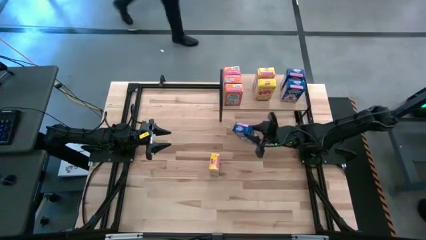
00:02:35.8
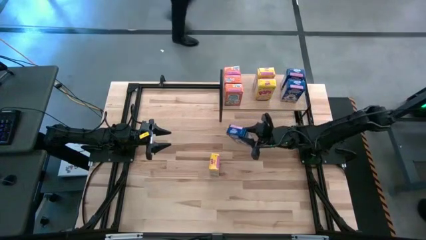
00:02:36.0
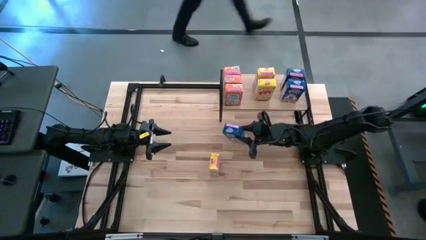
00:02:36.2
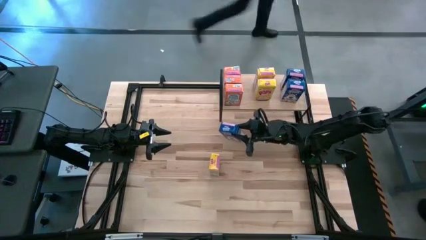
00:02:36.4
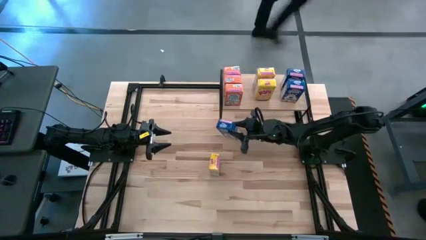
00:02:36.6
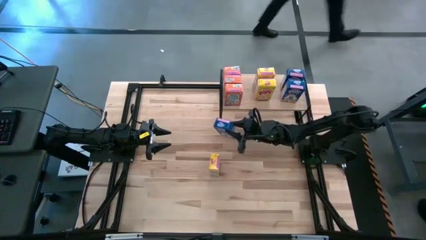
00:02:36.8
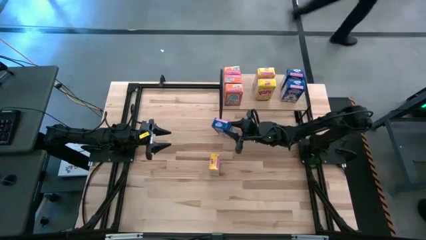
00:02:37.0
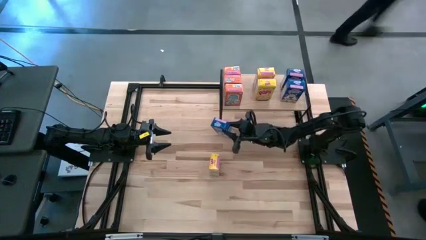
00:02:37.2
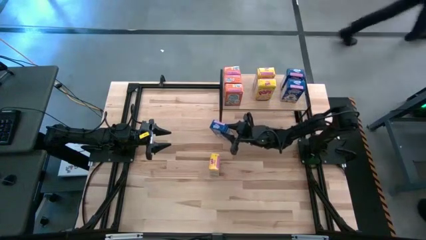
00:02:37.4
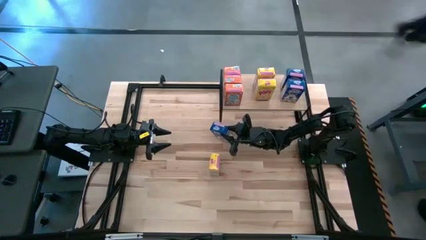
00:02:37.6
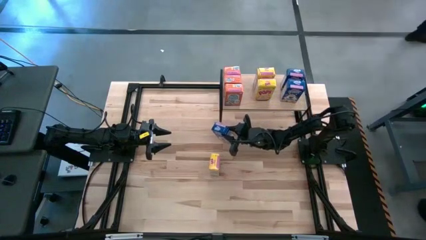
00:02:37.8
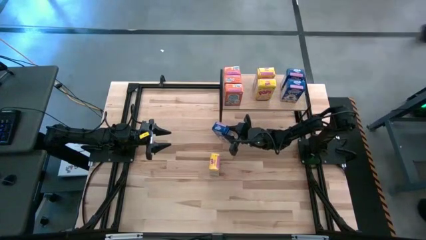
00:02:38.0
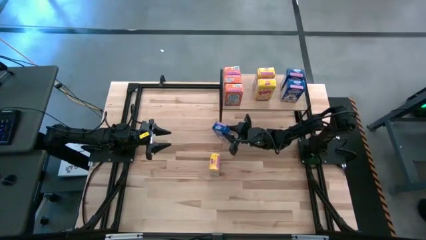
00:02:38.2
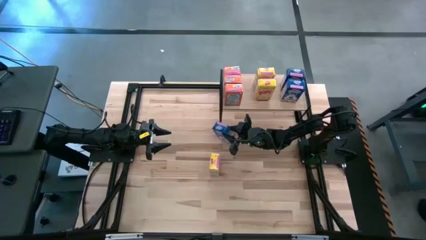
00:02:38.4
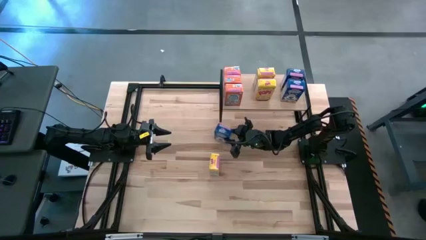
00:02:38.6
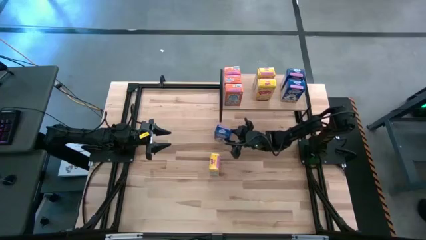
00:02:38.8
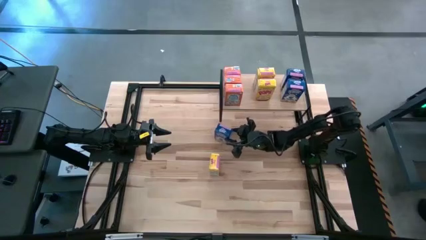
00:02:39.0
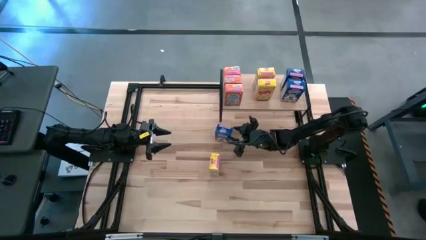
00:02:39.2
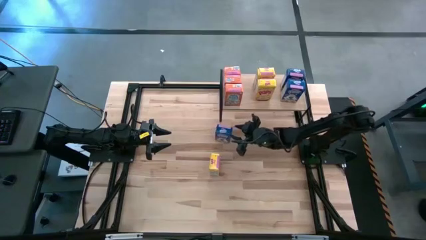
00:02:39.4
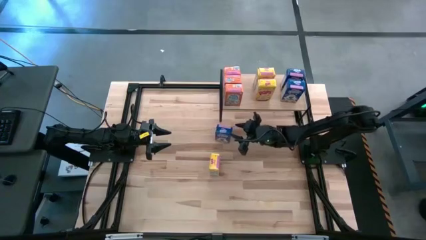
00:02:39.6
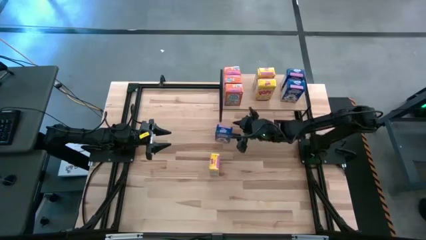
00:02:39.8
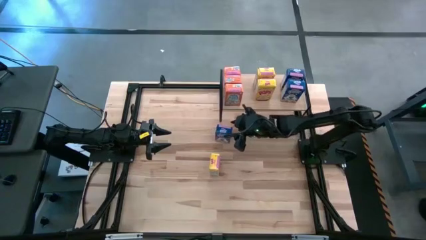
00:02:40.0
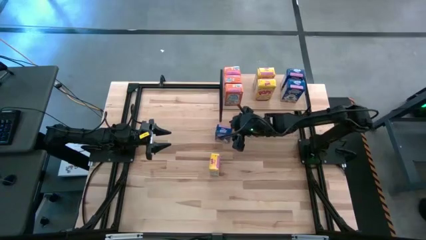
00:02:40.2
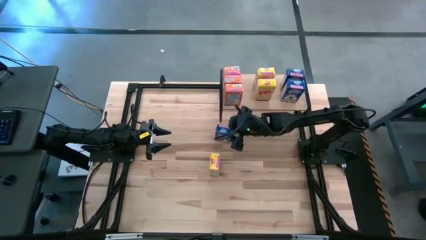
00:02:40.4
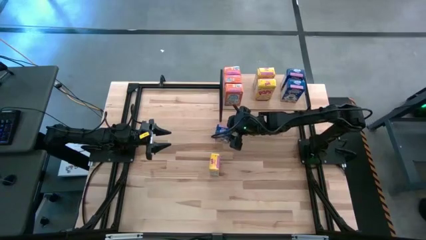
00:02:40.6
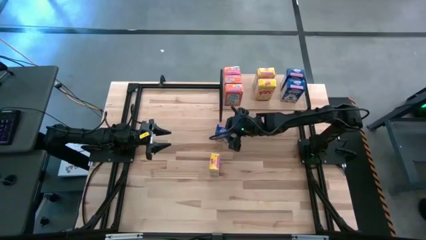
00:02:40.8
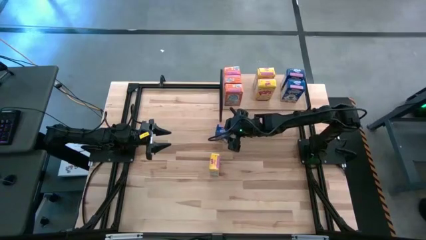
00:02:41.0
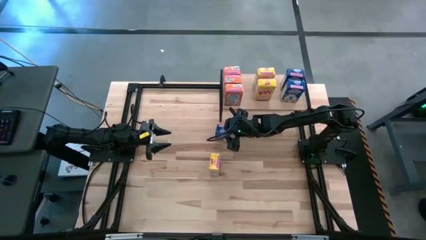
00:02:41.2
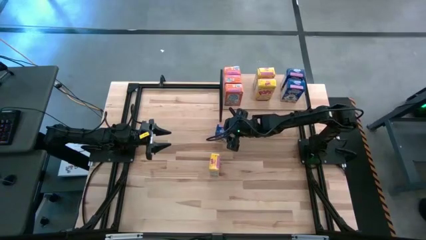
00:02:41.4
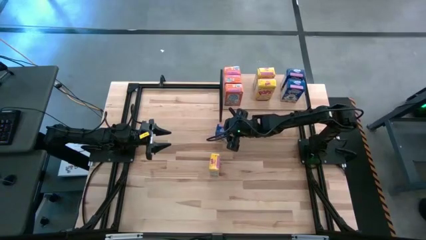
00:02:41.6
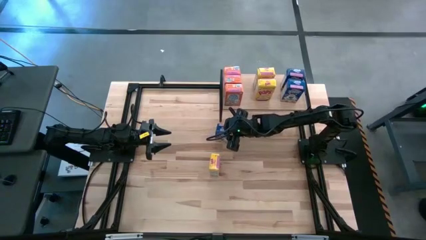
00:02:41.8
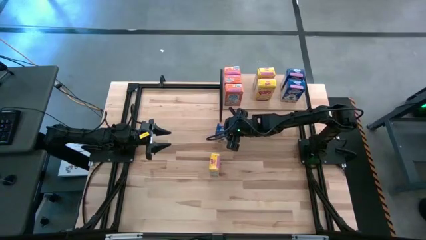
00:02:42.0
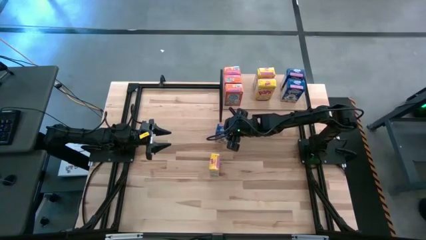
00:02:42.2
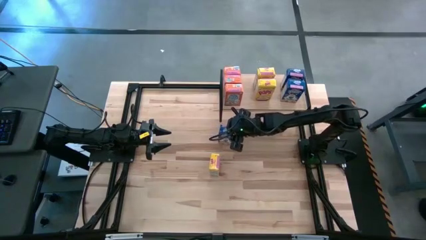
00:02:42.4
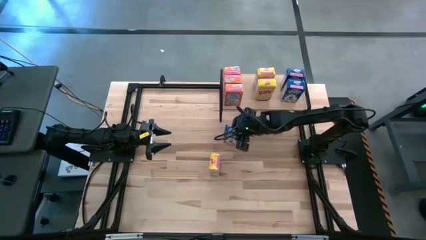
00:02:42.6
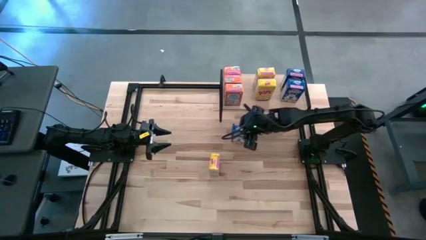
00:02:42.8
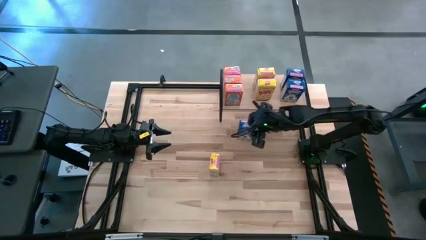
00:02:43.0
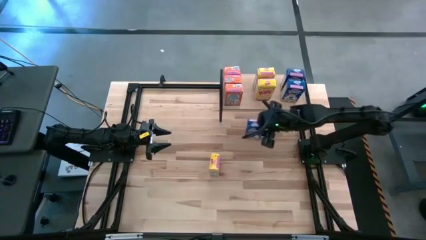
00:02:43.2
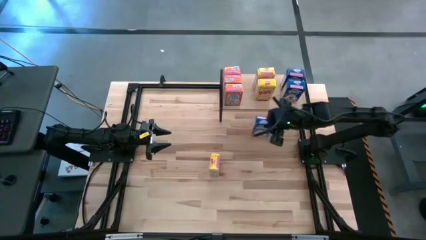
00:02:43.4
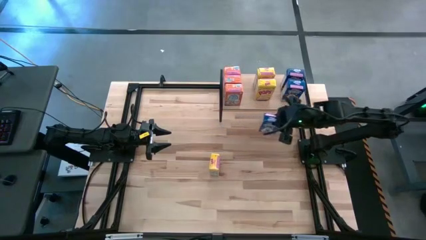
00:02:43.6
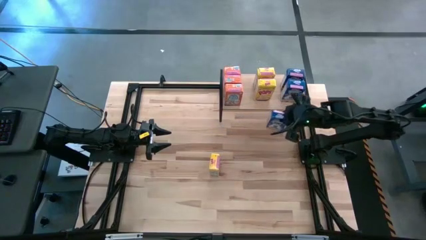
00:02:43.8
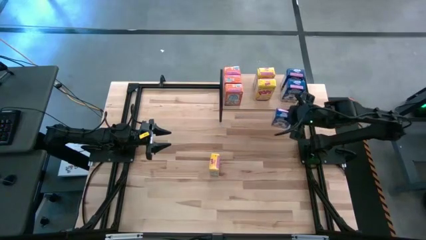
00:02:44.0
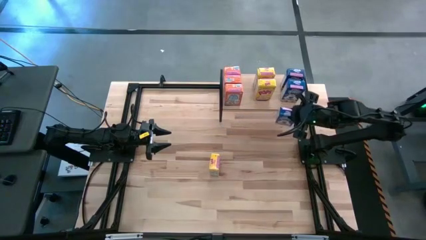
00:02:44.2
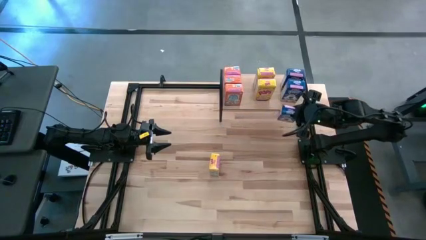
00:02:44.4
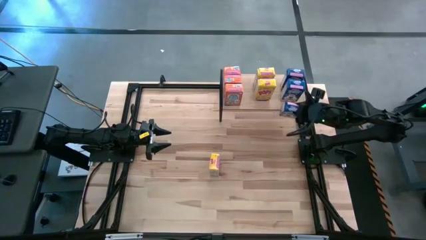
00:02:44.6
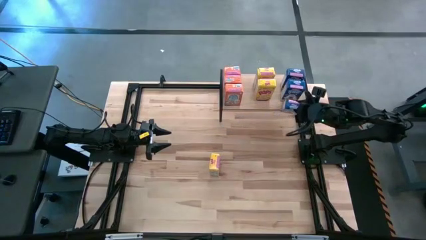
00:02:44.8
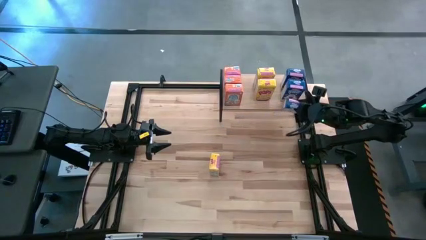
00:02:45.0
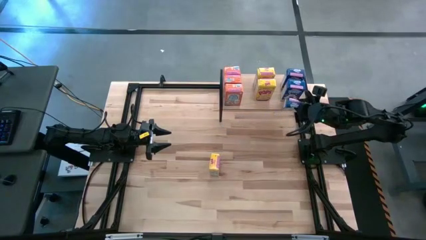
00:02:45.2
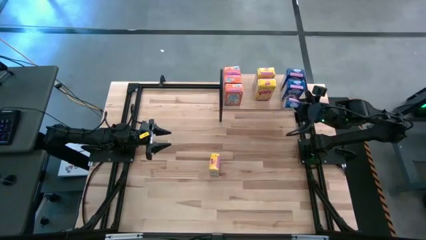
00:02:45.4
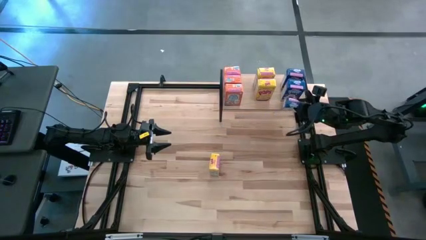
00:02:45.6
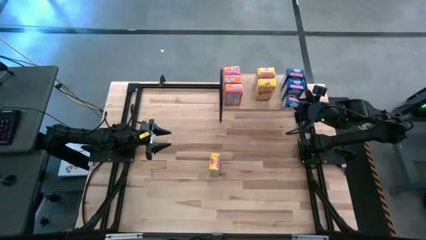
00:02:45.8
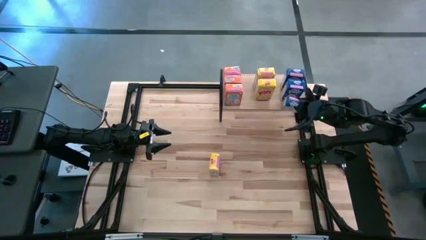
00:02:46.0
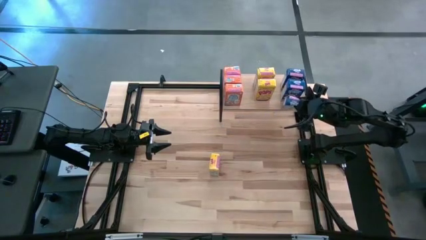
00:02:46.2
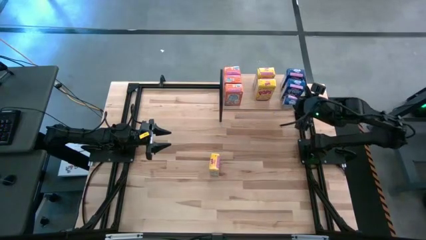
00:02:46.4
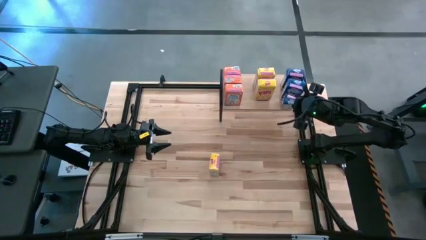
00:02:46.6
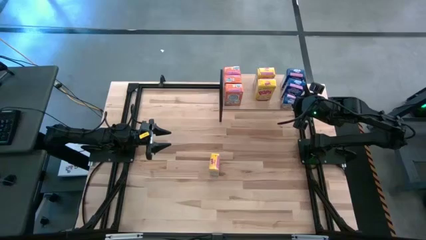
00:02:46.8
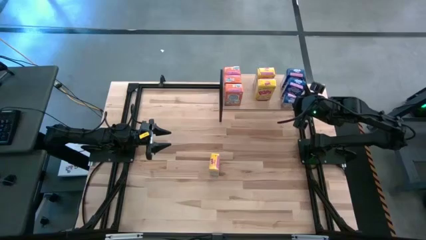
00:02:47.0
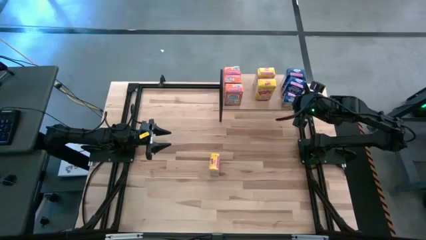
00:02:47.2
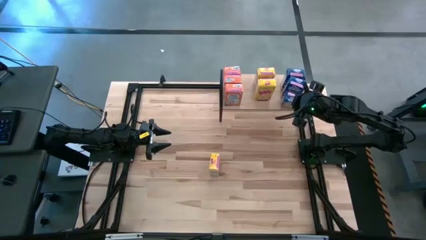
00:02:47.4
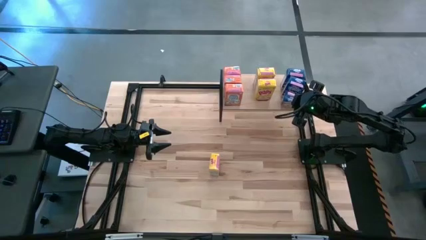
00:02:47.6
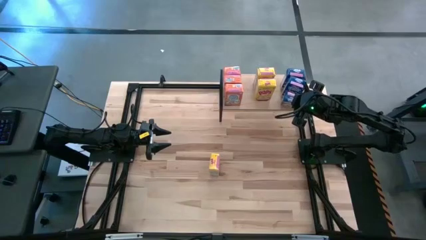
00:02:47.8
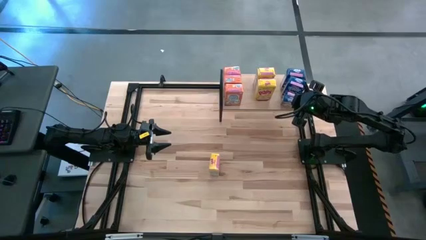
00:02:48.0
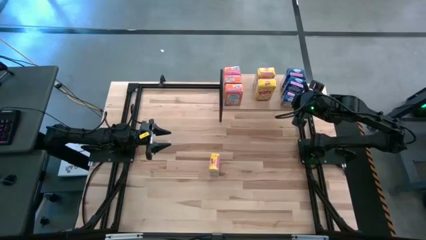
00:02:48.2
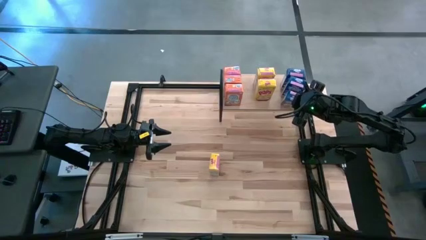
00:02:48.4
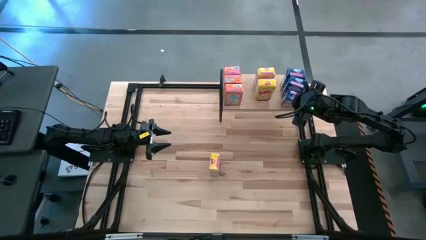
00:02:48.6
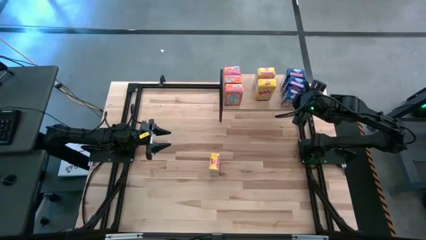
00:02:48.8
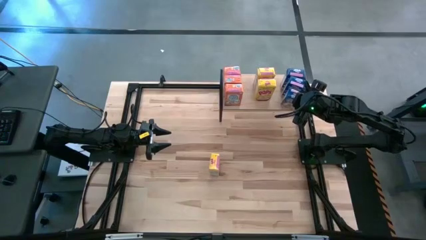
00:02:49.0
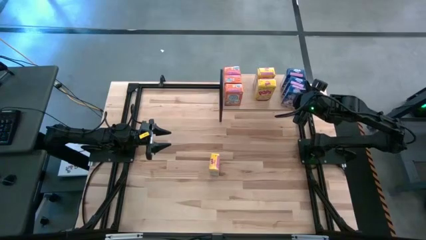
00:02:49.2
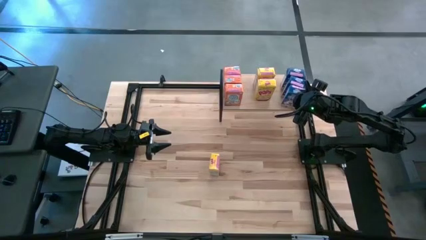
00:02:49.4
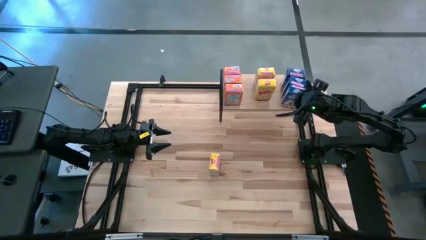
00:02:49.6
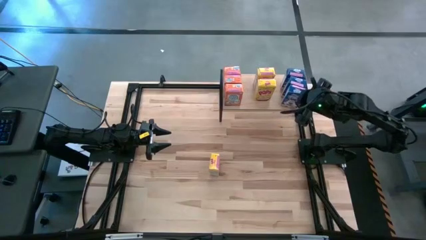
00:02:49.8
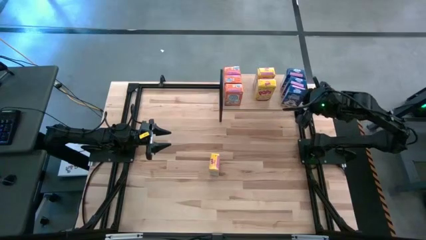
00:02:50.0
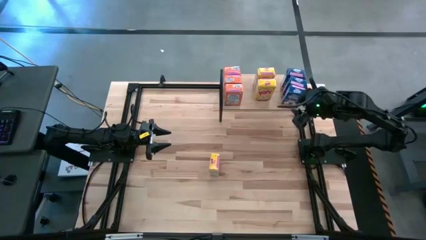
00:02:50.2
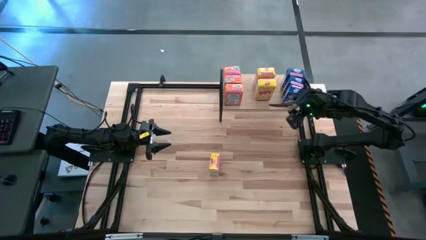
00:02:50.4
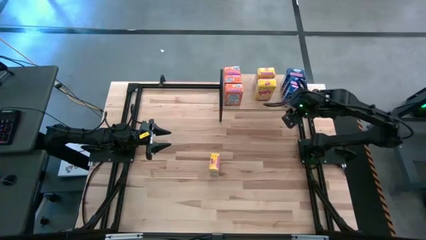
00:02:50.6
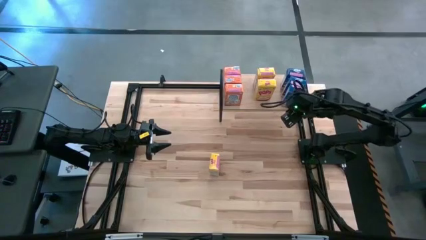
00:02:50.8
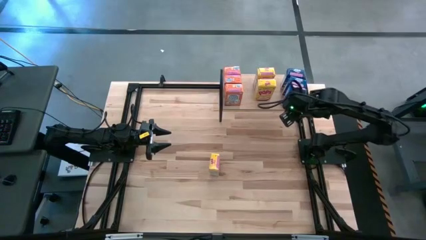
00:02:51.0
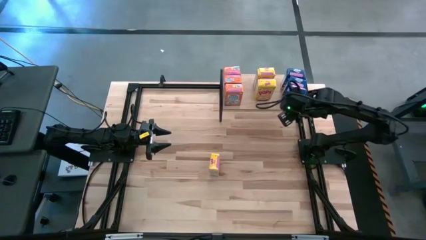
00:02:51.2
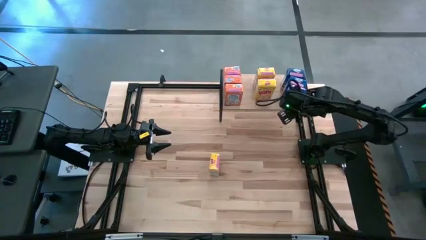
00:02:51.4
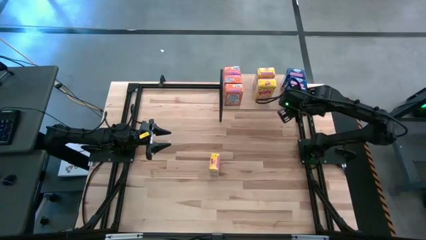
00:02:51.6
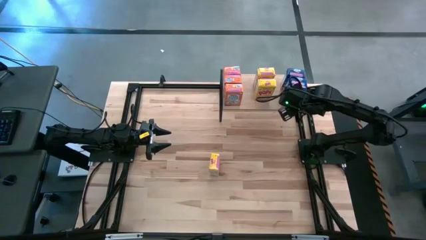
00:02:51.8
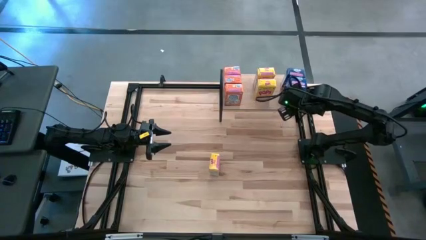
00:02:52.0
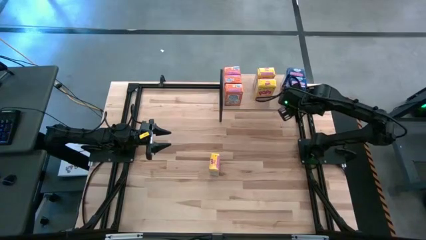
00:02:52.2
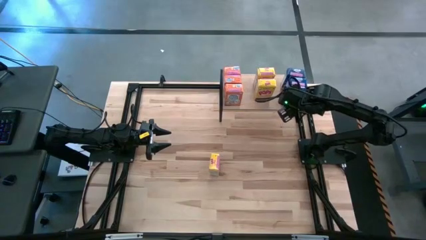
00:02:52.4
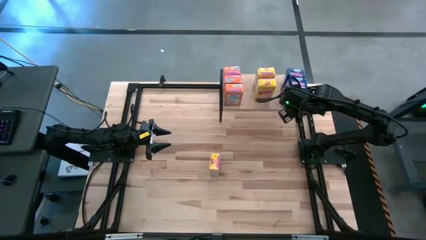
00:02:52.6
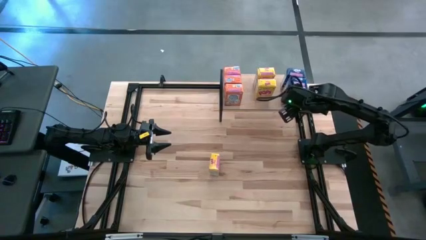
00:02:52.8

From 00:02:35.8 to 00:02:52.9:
Task: Stack cereal on shelf
Put the blue cereal box on the shelf aligned with the blue cereal boxes
